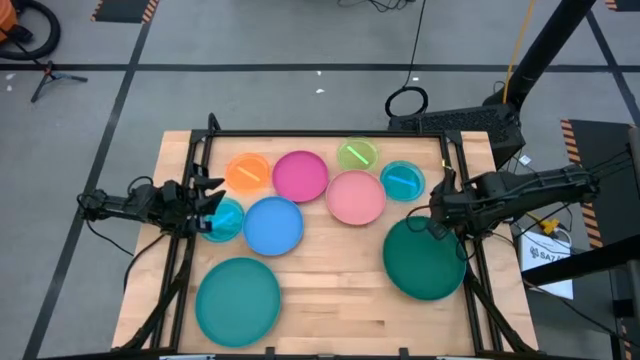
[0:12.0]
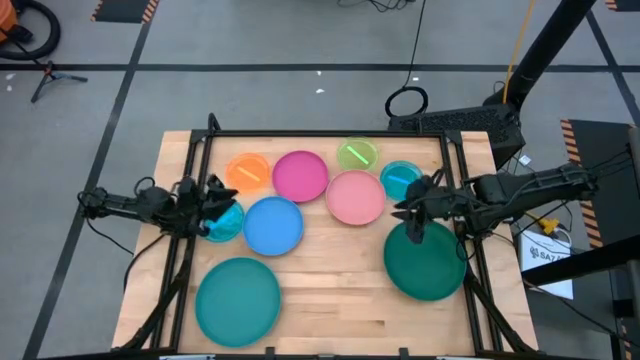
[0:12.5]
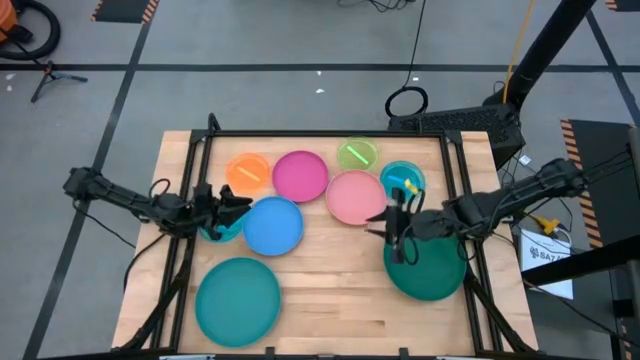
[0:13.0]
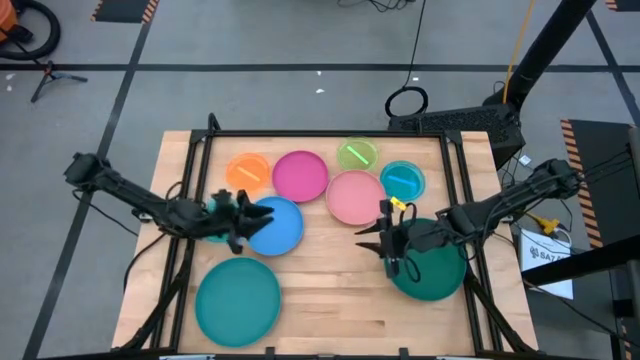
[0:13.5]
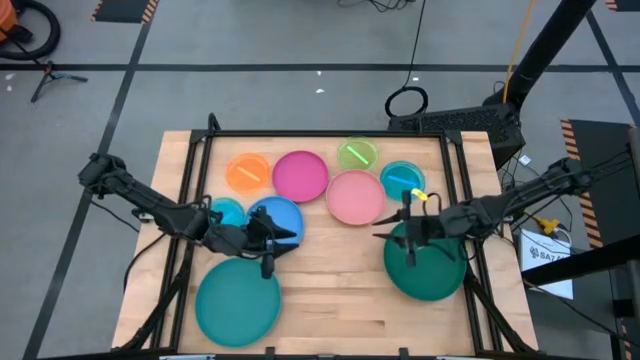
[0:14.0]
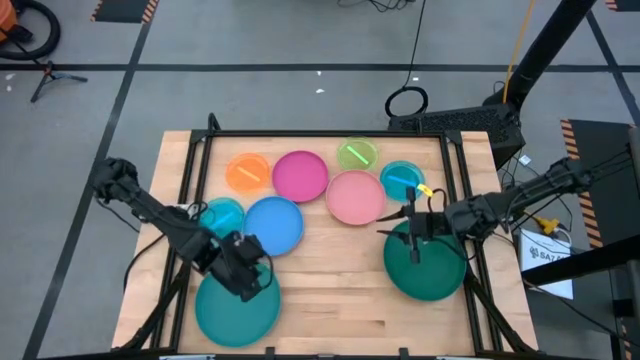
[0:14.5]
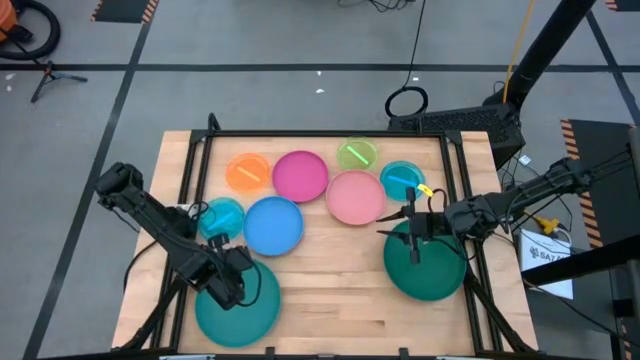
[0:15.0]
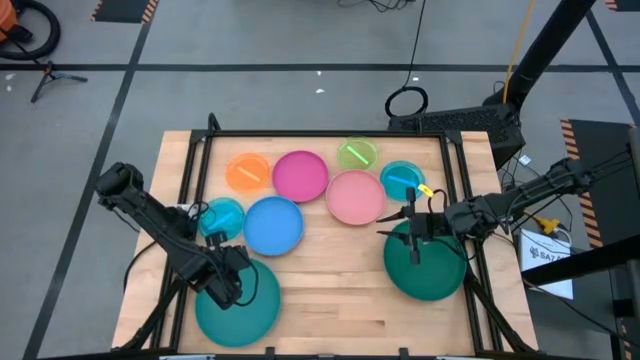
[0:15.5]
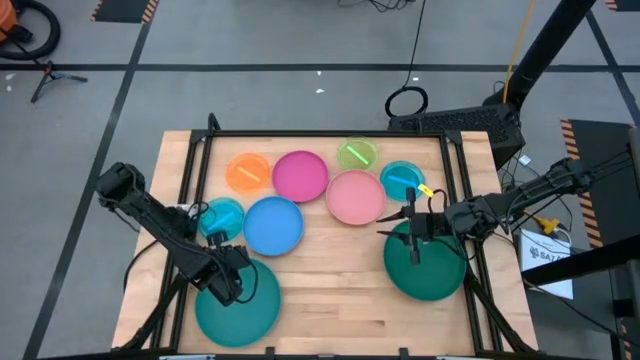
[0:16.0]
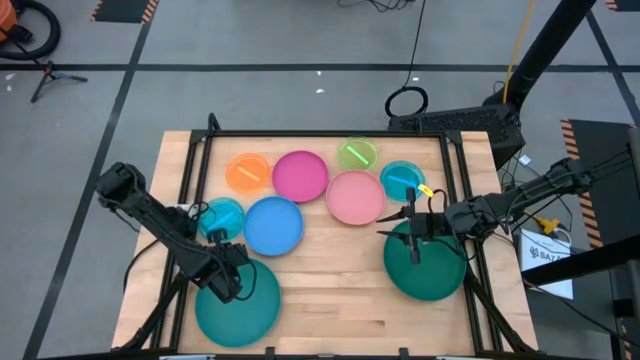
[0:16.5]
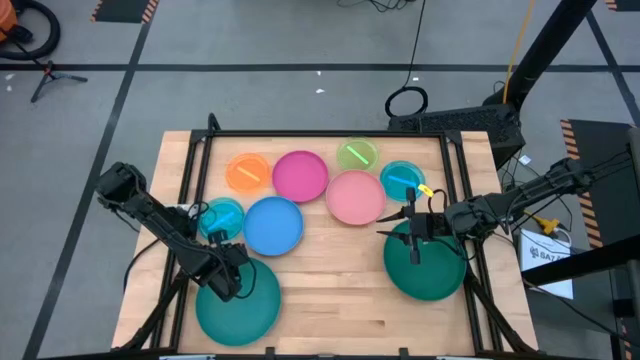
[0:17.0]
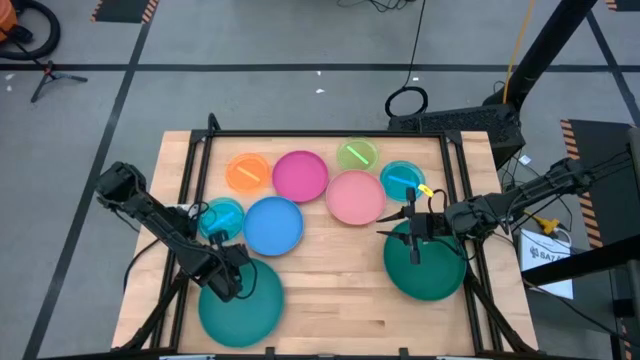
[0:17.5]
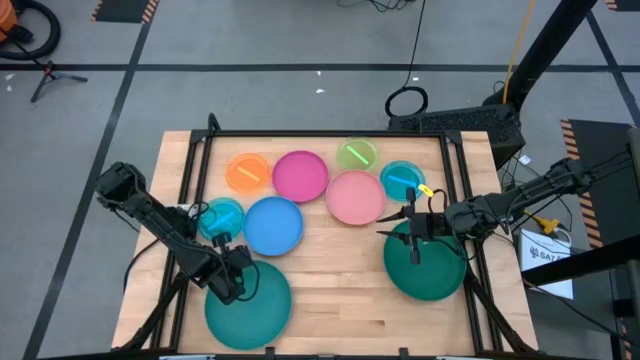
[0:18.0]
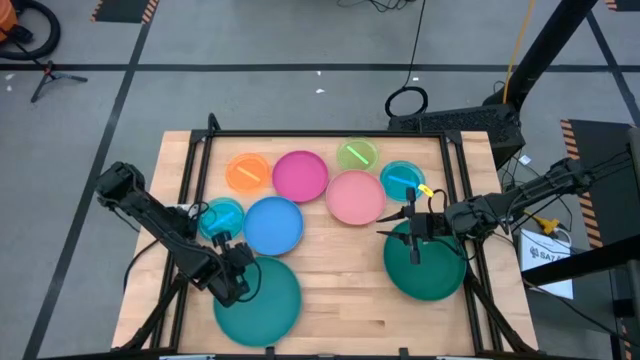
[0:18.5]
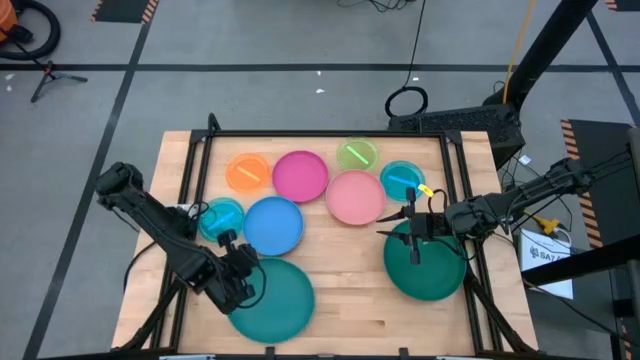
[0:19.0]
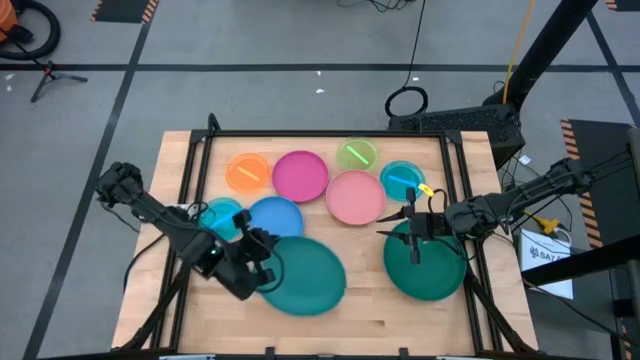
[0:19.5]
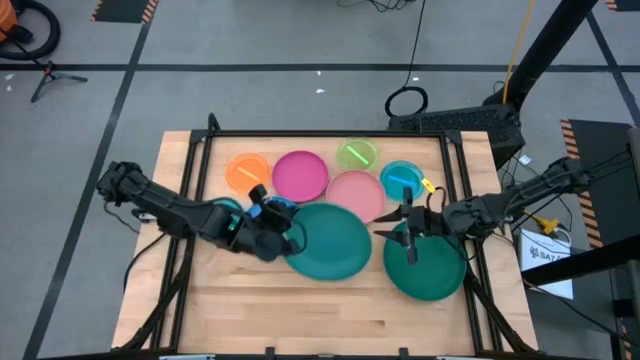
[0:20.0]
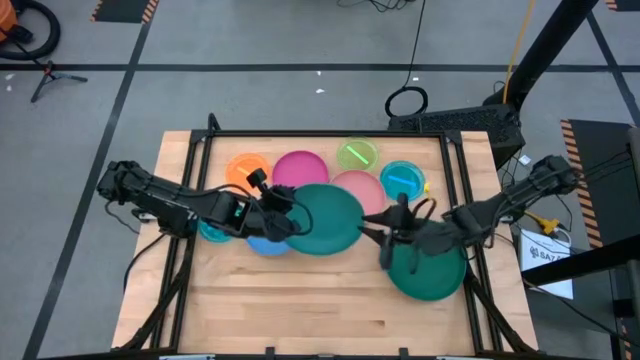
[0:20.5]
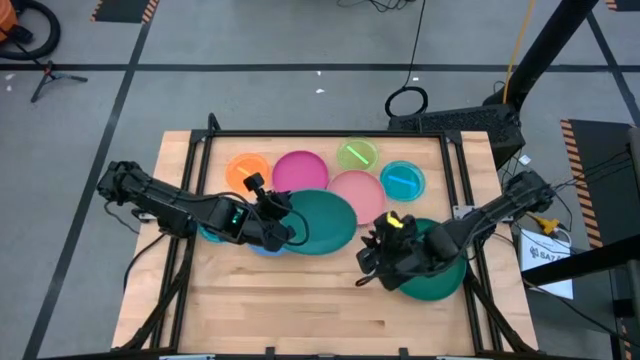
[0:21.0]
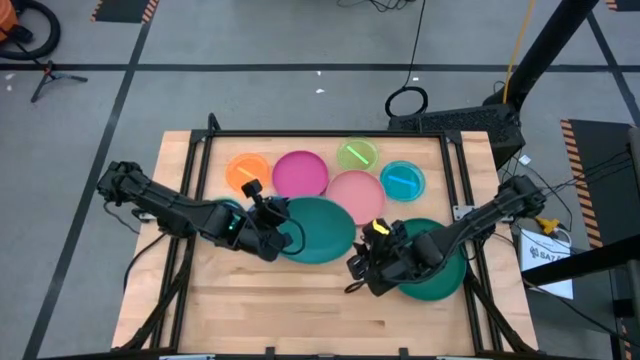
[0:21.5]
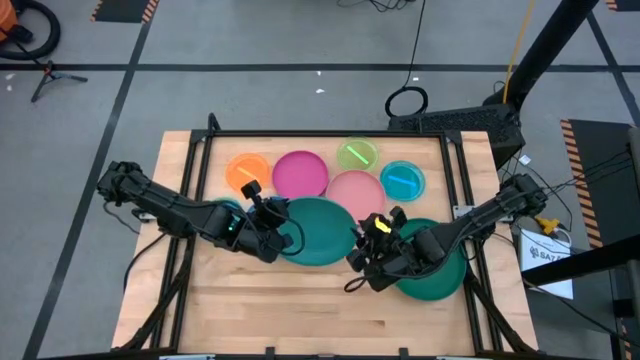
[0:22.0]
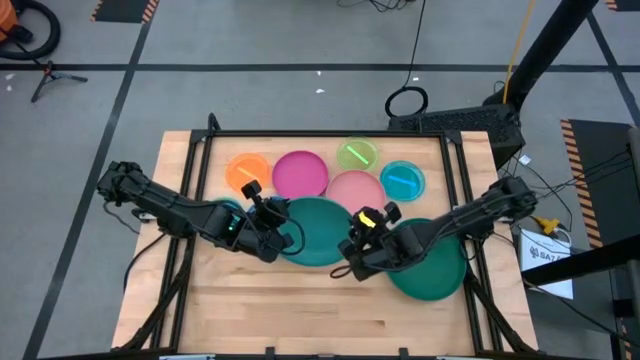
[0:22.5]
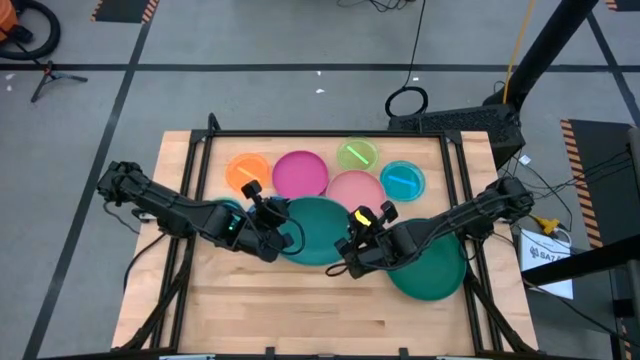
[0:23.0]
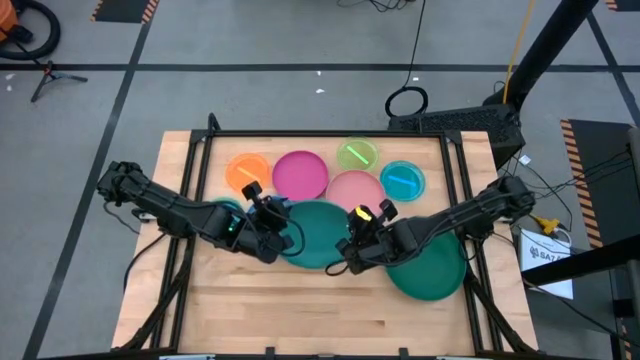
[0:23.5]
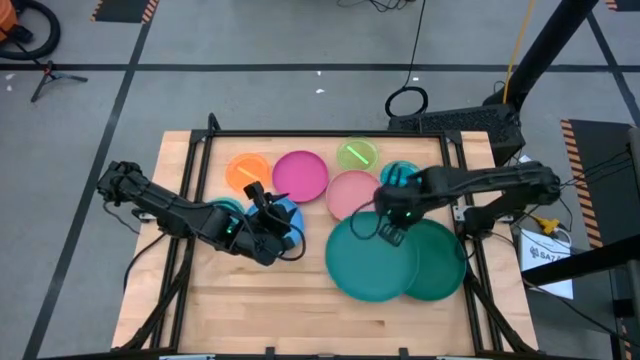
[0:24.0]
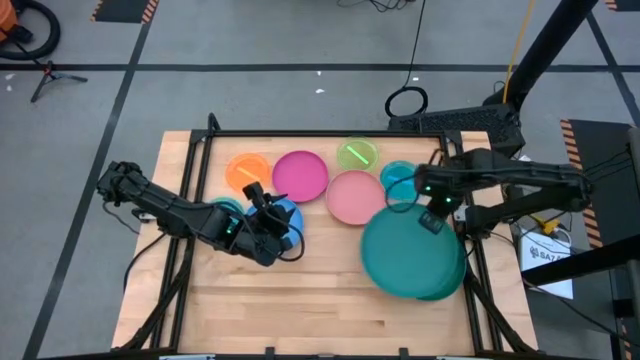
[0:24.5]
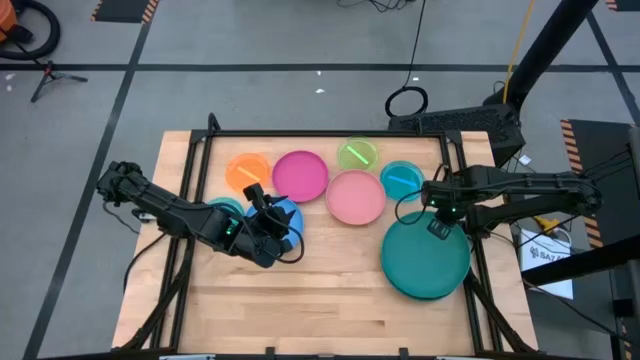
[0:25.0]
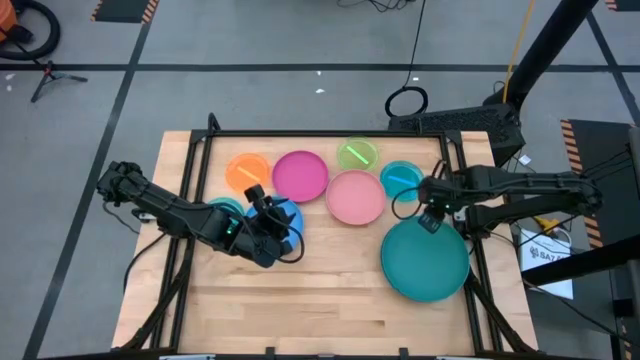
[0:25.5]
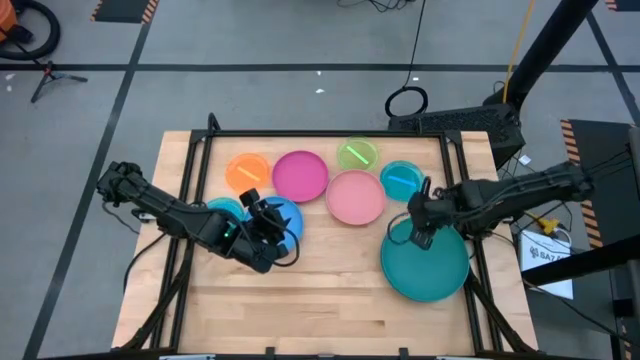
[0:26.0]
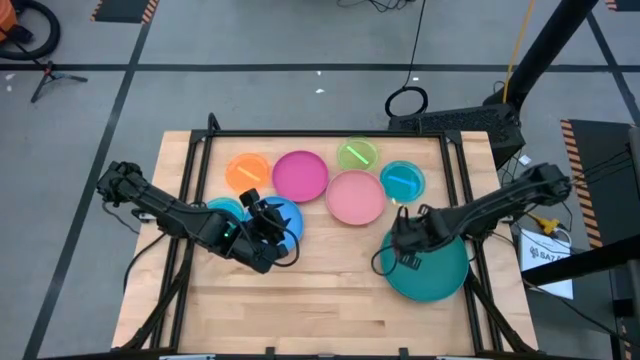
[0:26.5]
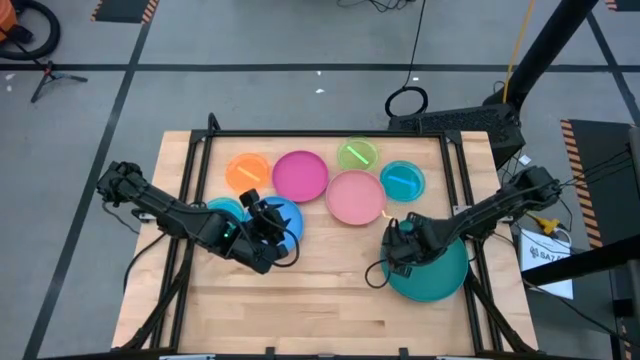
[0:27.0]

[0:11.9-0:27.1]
Task: Stack plastic plates
Stack the green plate on top of the dark green plate

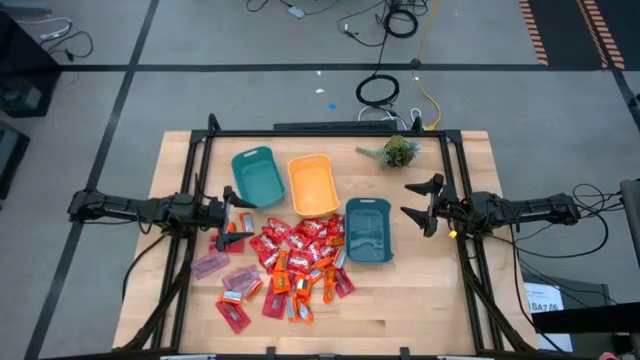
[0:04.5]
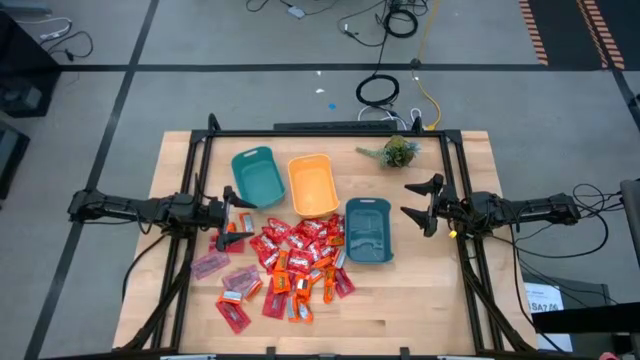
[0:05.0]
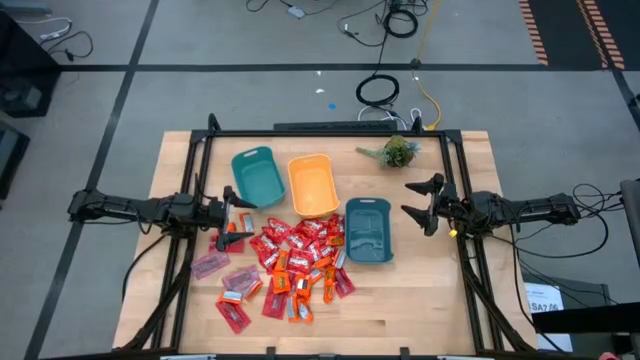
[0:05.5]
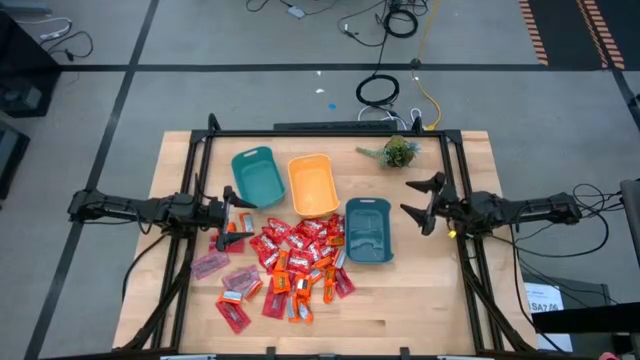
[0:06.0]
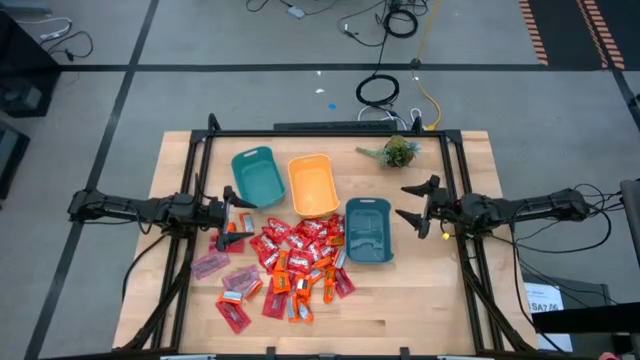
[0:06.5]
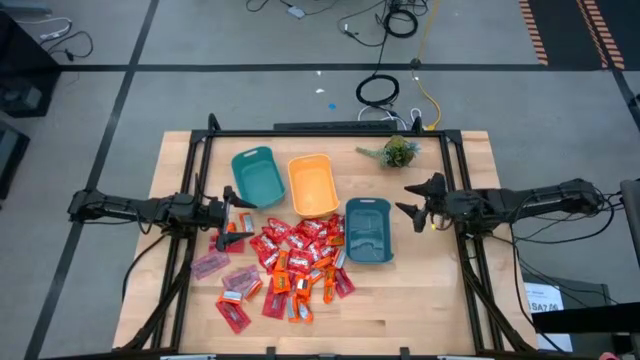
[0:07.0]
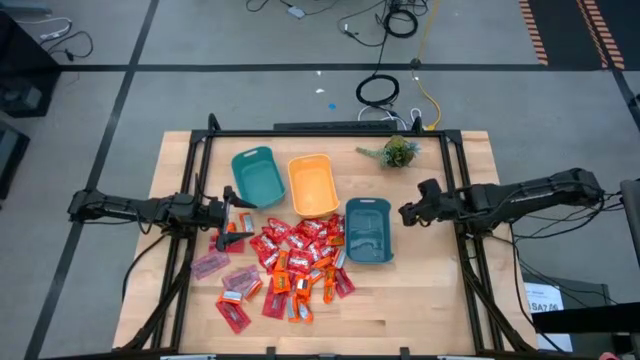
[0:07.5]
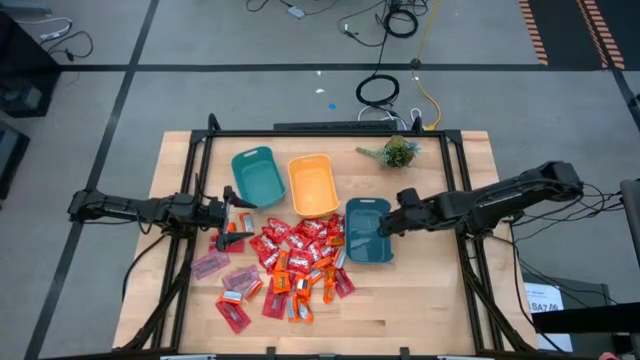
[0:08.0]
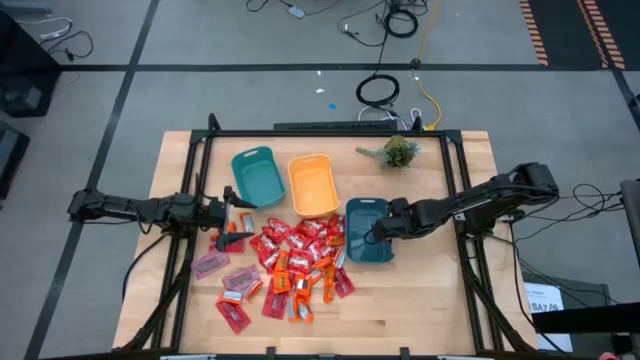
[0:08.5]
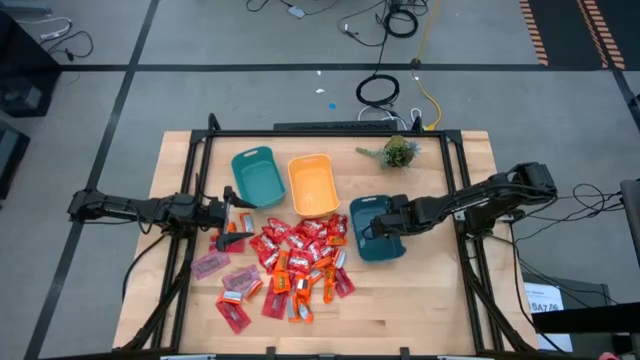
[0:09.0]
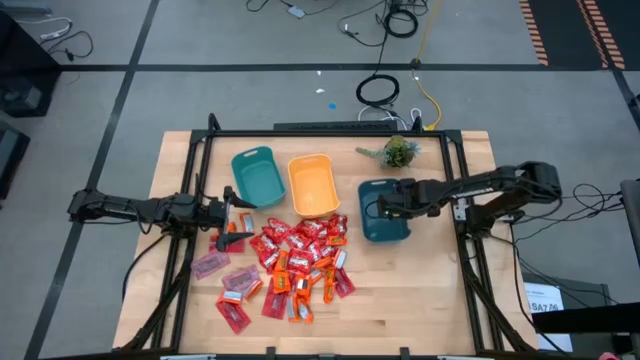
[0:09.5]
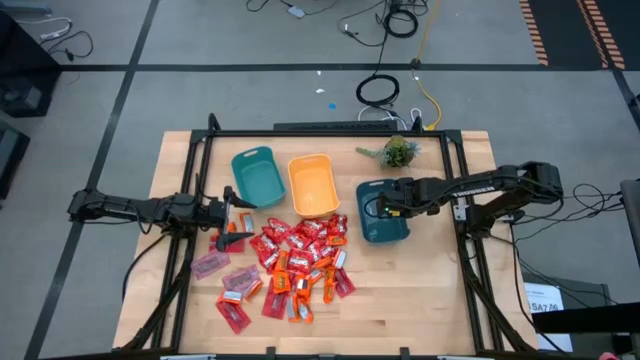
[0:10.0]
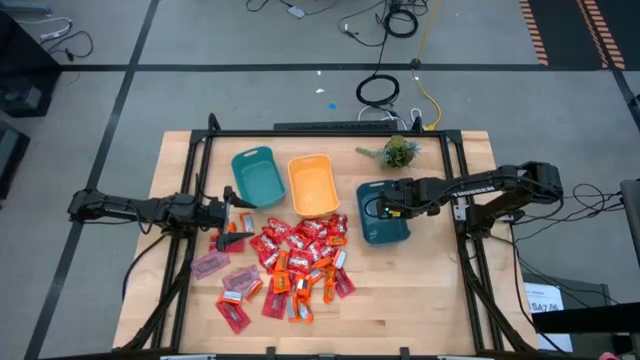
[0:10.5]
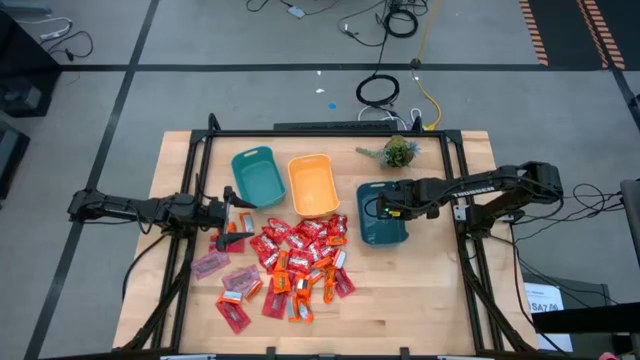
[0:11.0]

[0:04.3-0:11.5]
Task: Sort candy
Adjust the dark blue bin
